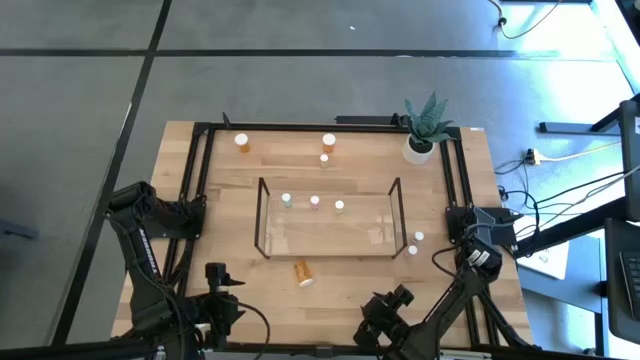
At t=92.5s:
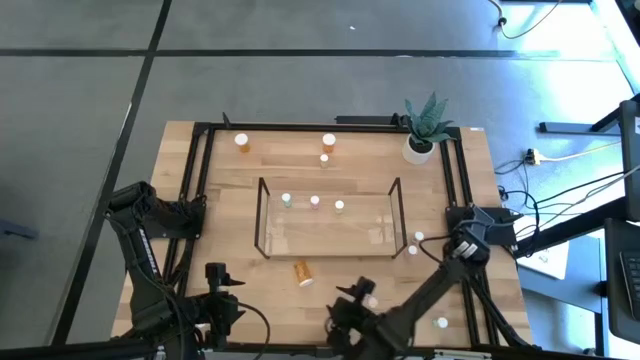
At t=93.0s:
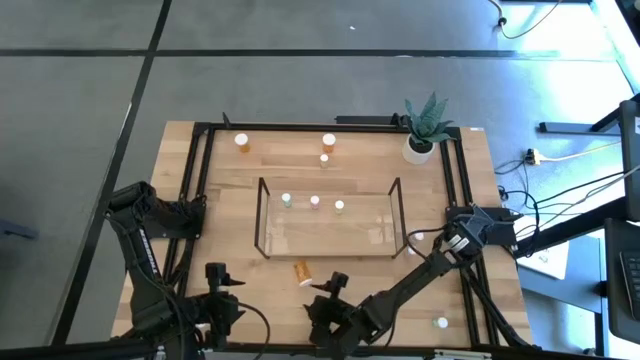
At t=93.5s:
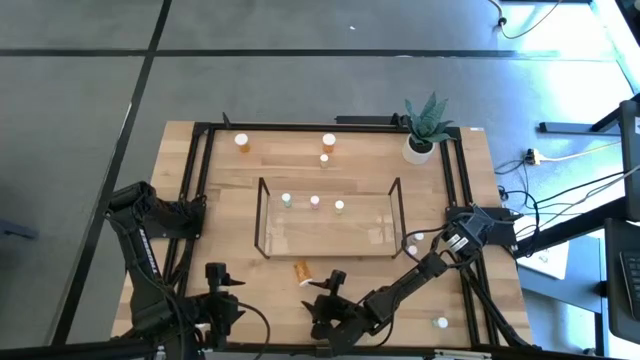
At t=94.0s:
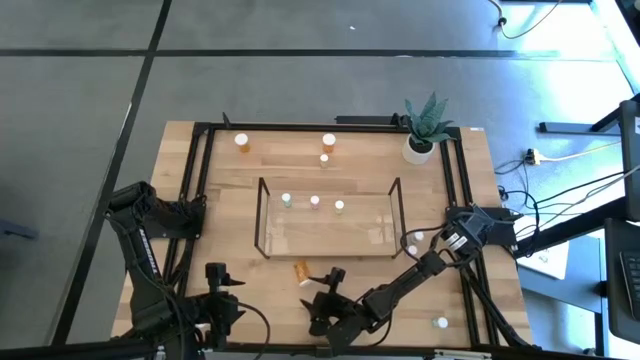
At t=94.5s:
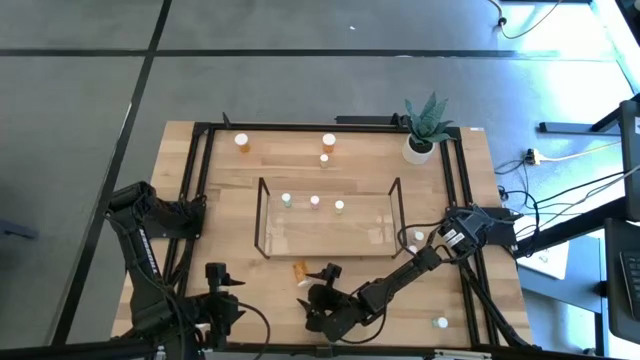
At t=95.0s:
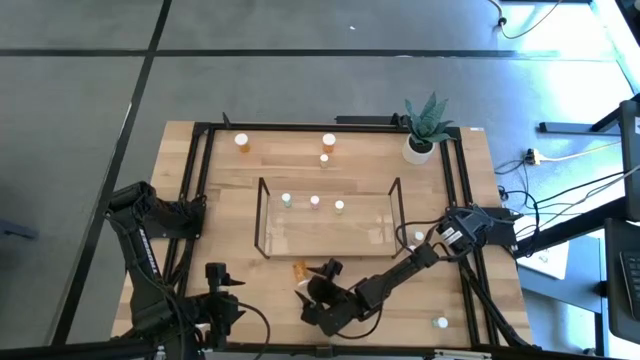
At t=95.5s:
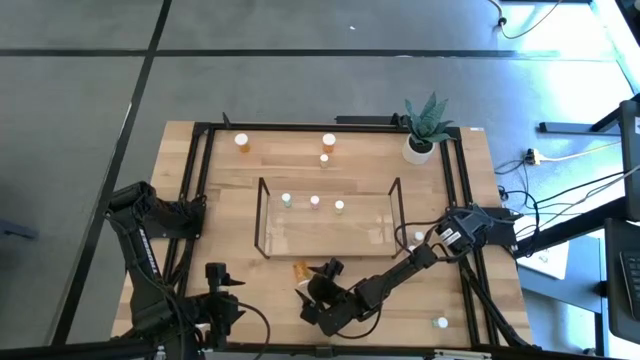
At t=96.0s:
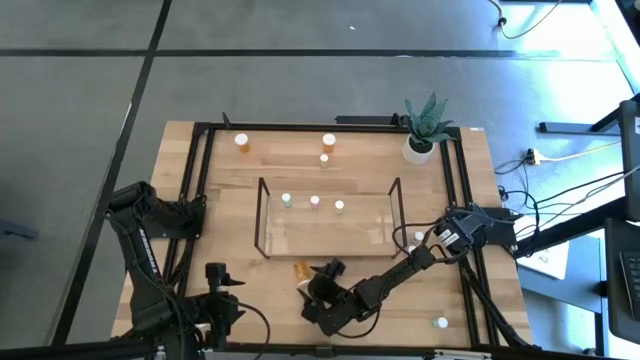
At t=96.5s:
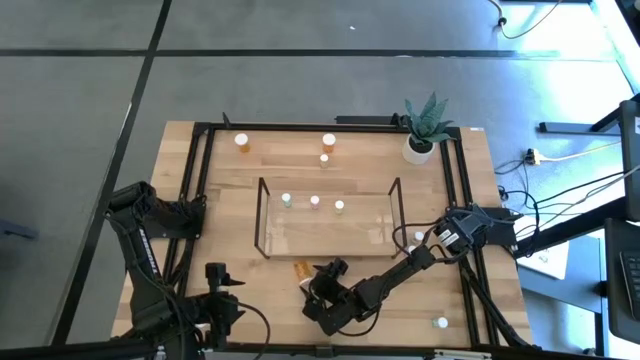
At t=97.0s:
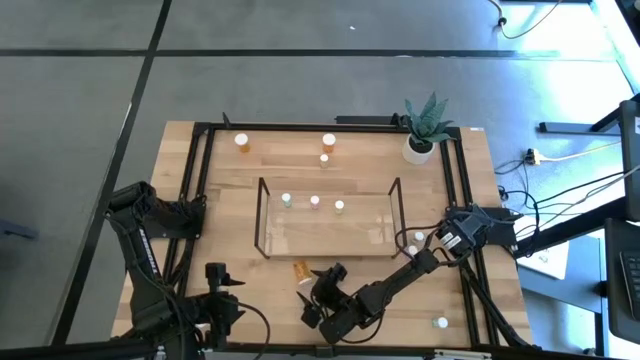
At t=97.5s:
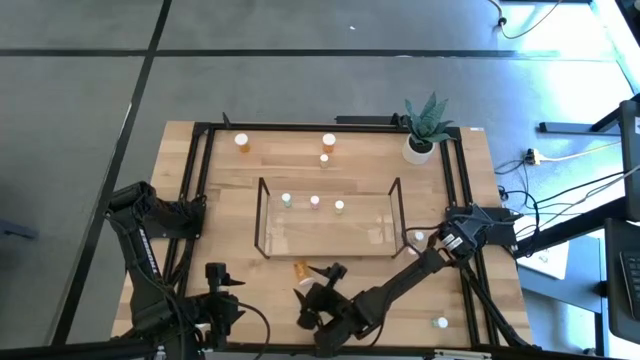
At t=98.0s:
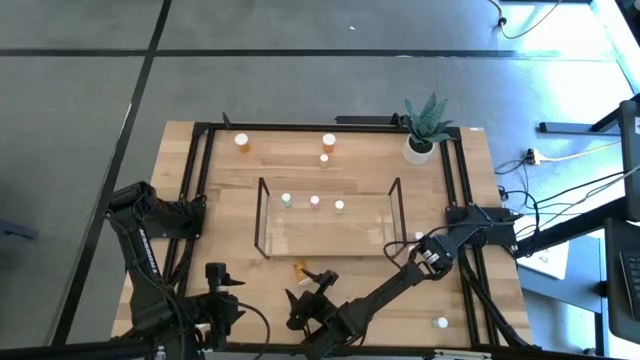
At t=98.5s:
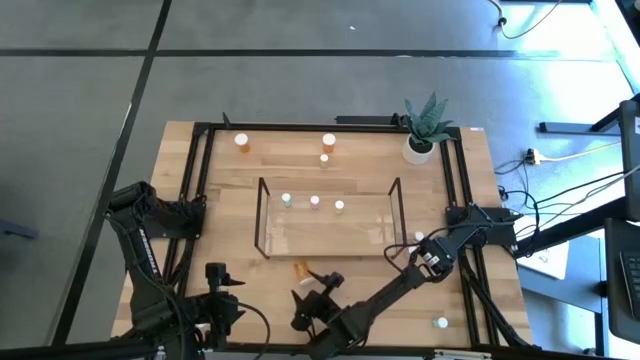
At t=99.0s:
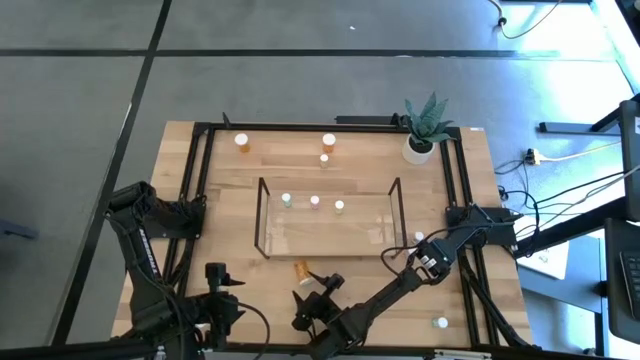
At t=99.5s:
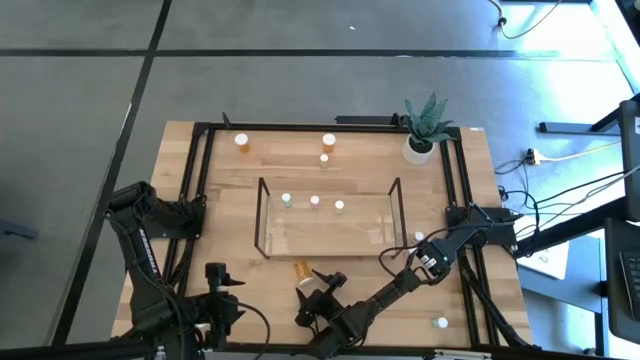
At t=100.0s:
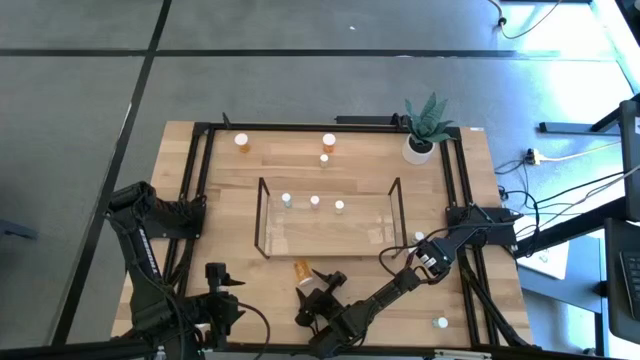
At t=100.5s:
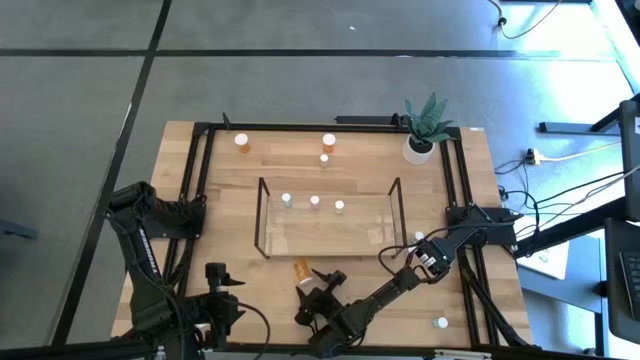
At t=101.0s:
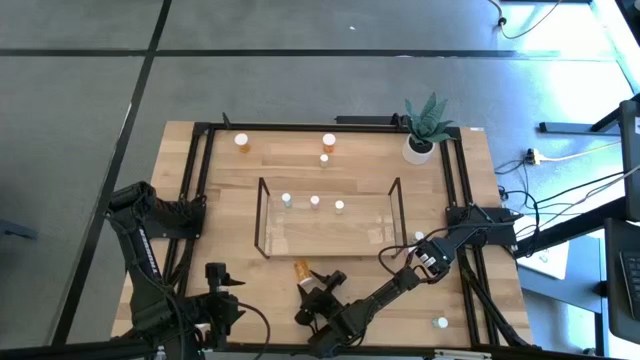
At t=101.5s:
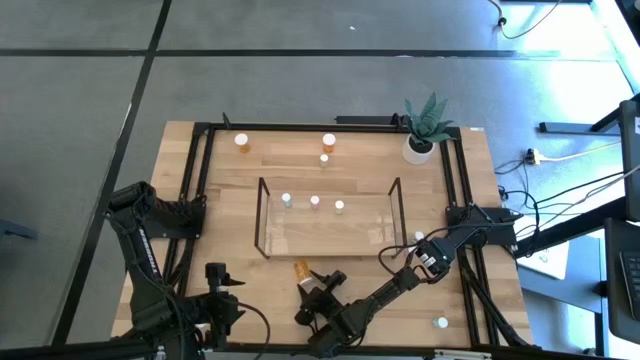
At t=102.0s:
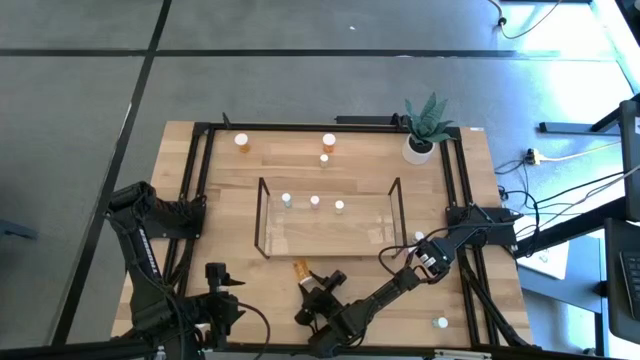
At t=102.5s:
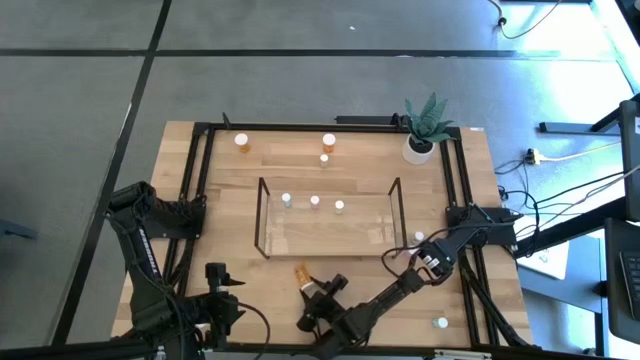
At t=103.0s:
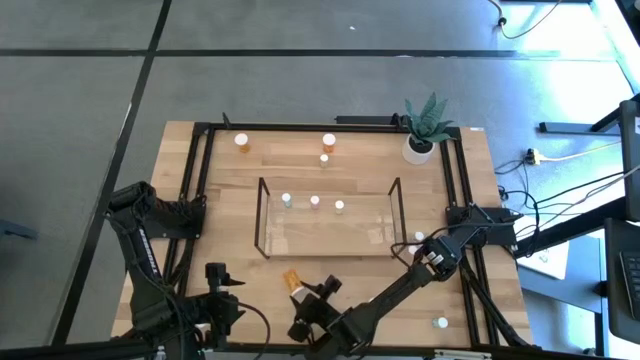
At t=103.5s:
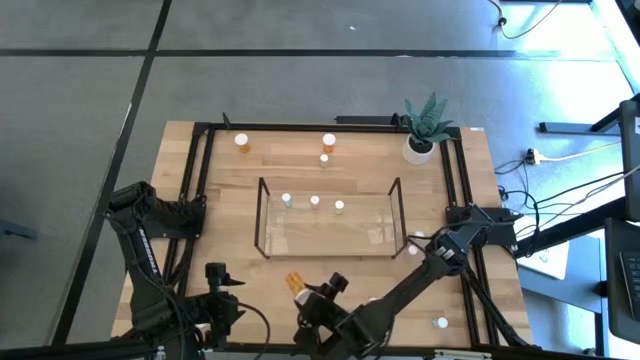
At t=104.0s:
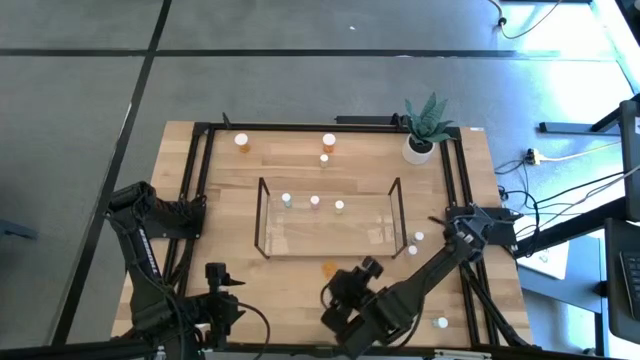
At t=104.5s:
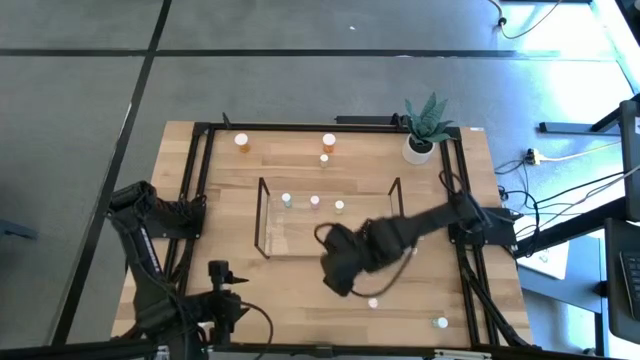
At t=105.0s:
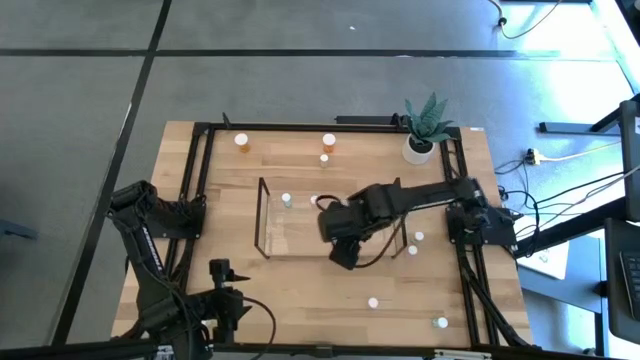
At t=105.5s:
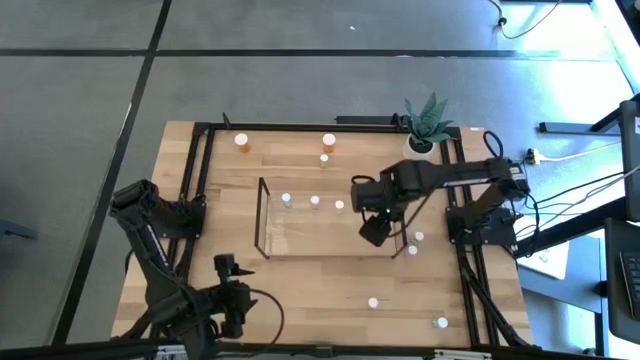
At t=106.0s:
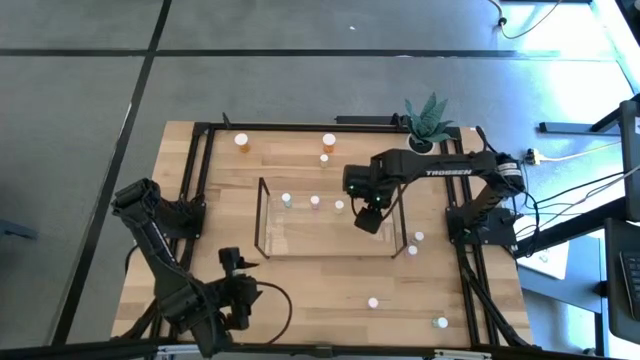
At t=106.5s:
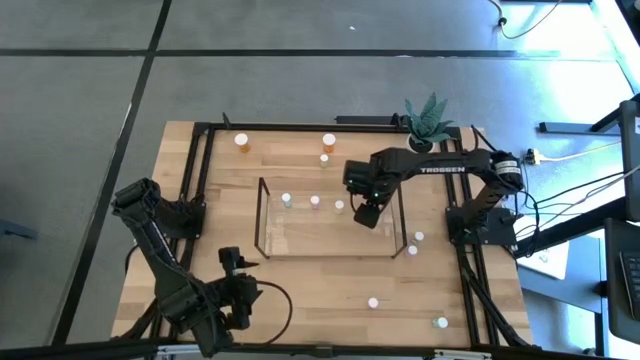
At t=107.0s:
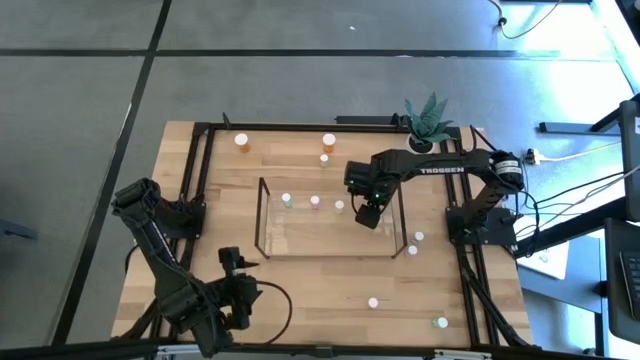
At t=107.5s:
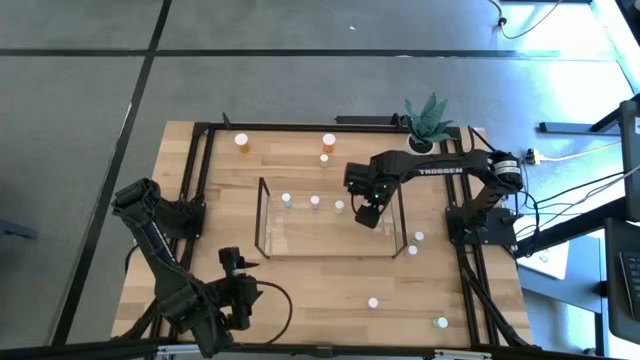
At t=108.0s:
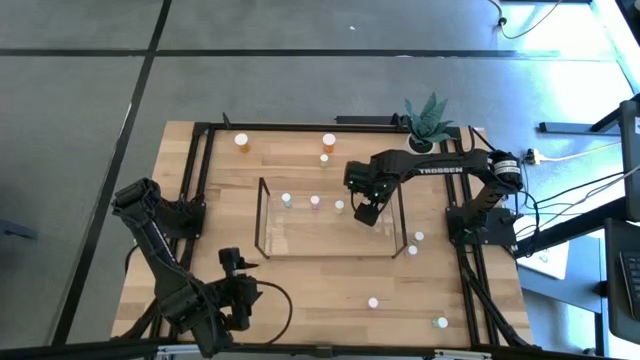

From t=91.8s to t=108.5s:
Task: Pick and place medicine bottles onto shelf by color
Put the bottom orange pill bottle on the shelf

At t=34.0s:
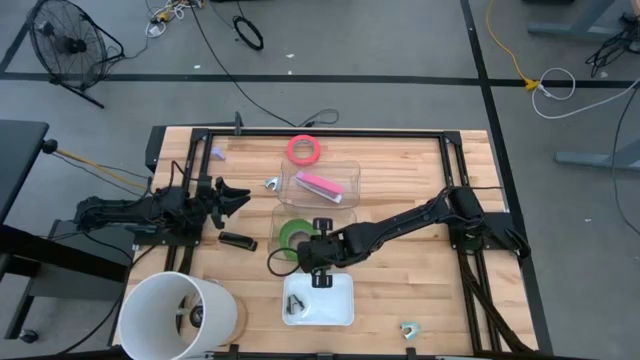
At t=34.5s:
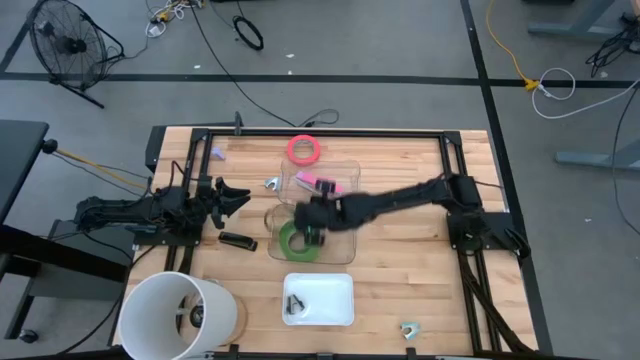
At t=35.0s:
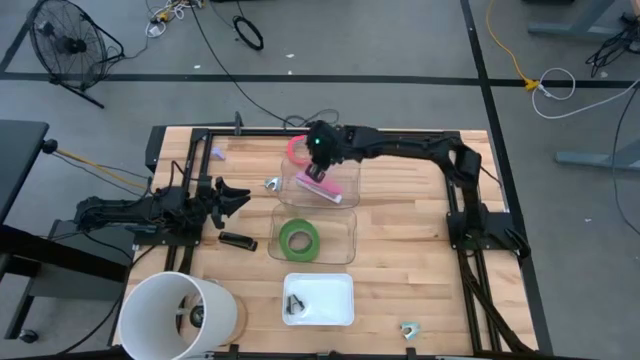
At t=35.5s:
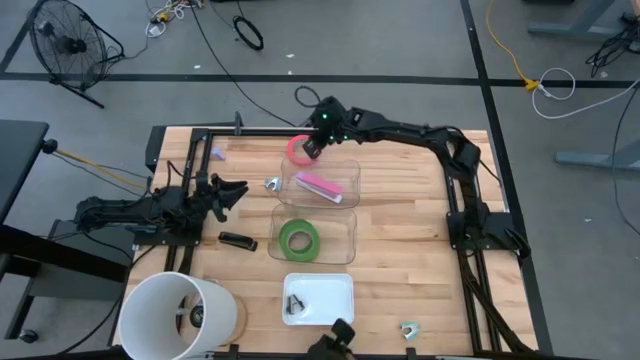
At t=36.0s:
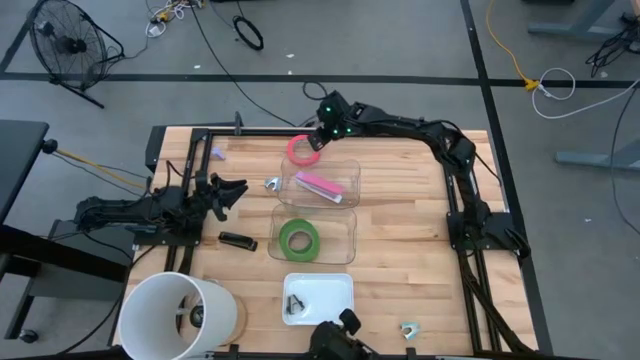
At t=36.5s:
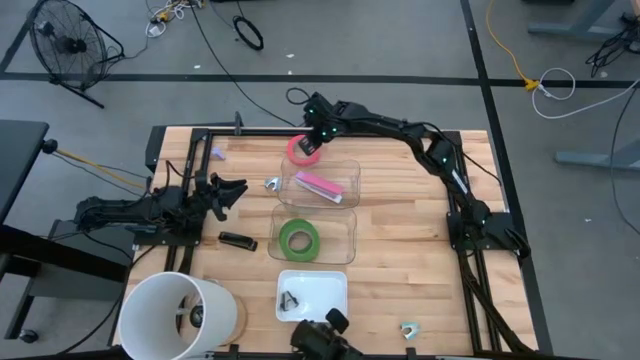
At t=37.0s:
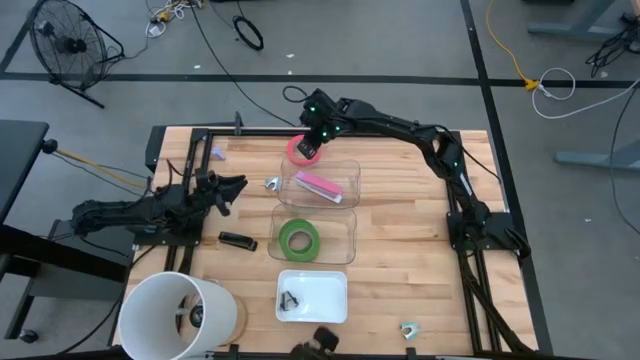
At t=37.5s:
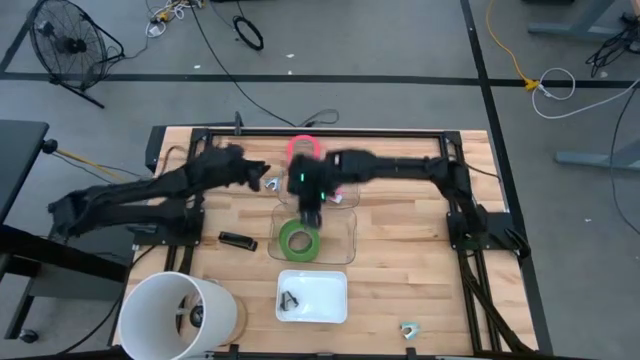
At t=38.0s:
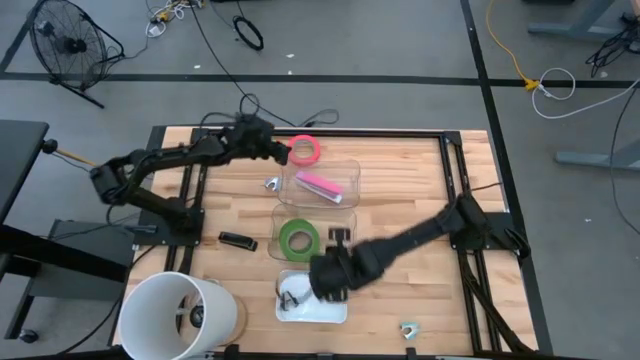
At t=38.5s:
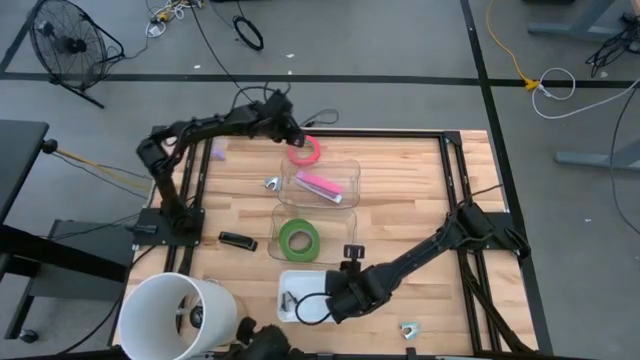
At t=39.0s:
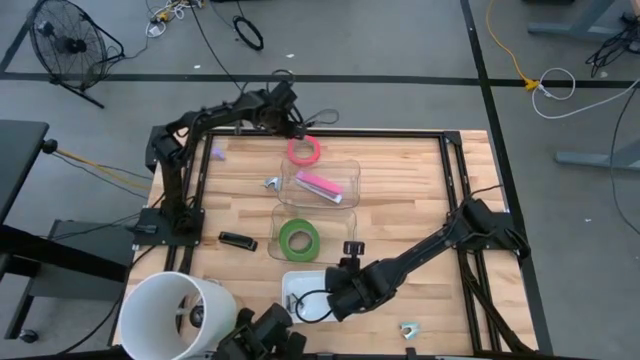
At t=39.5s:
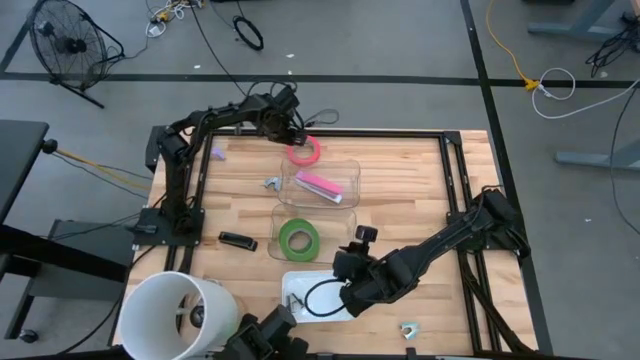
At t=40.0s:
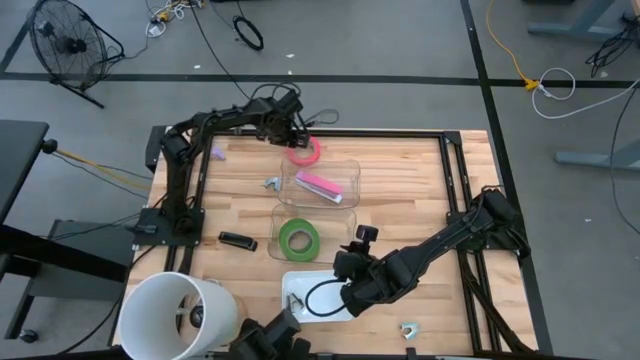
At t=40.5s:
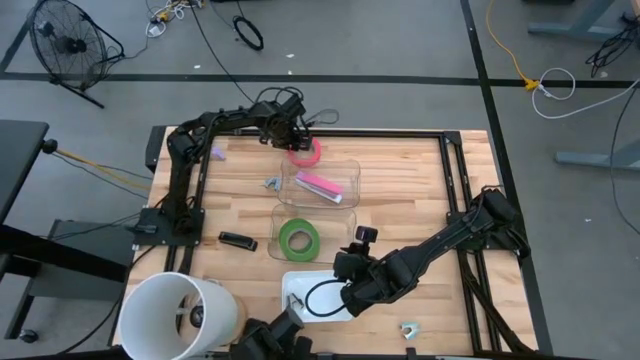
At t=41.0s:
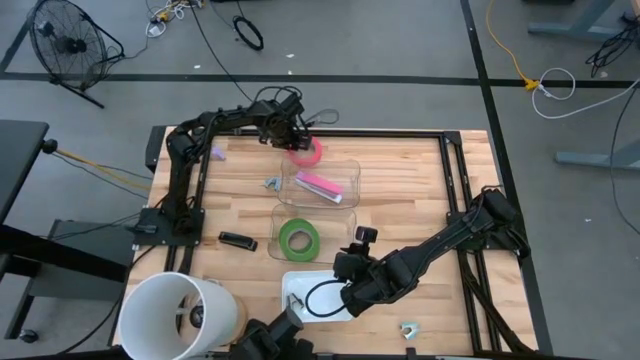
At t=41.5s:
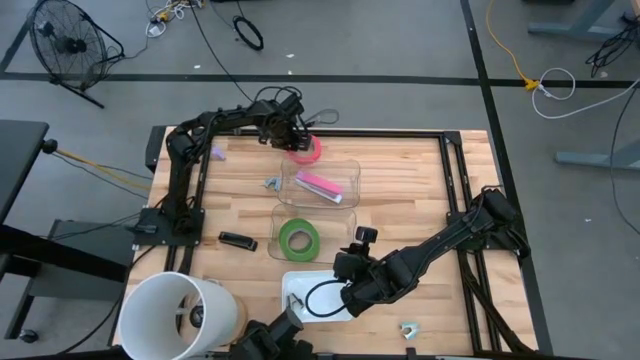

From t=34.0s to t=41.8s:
Task: Pick and place Stapler, Stapler remover, tape
Put the pink tape into the bottom transparent bin
